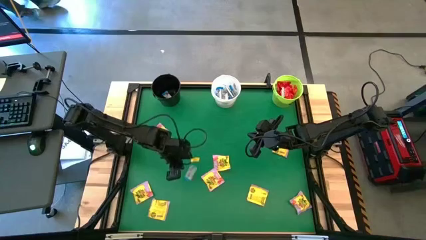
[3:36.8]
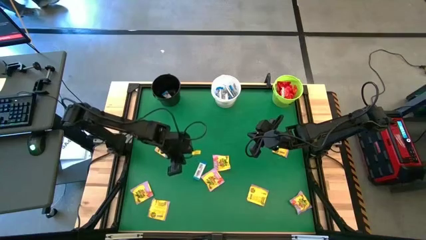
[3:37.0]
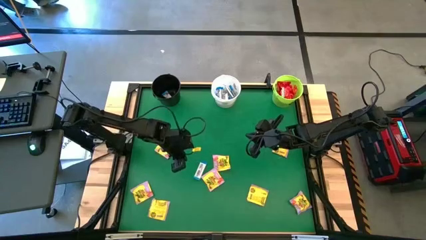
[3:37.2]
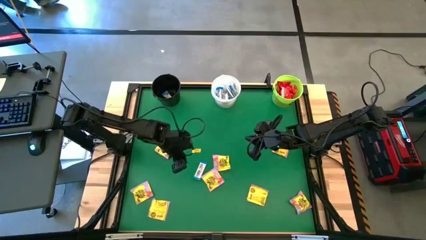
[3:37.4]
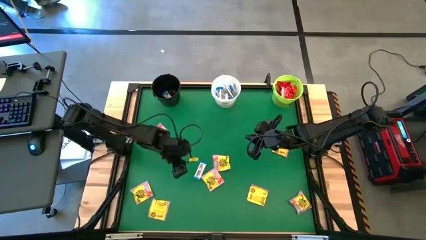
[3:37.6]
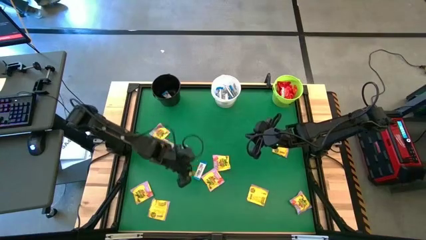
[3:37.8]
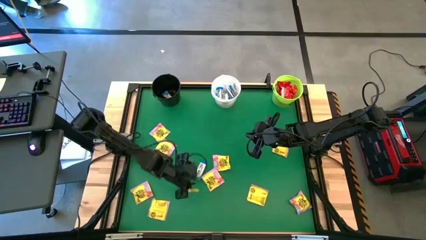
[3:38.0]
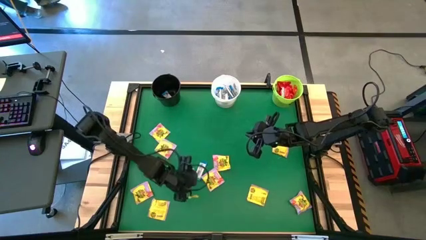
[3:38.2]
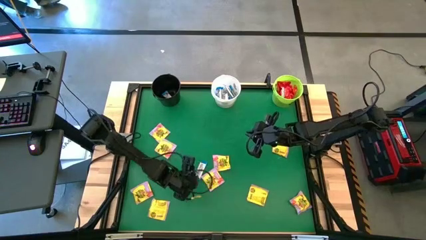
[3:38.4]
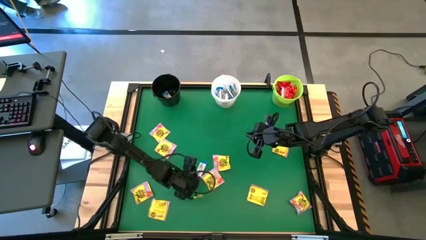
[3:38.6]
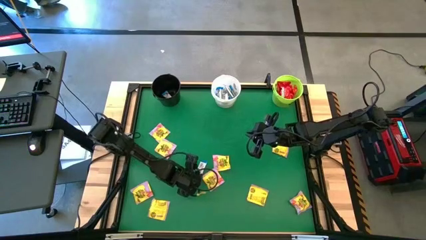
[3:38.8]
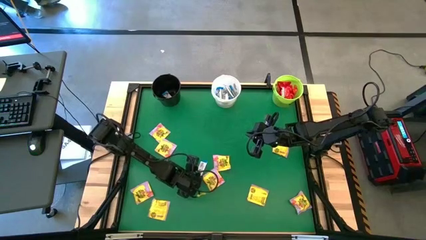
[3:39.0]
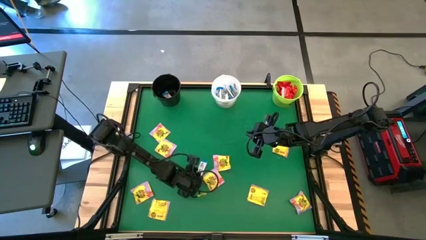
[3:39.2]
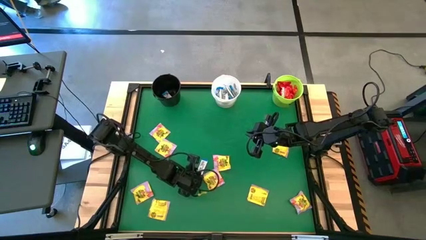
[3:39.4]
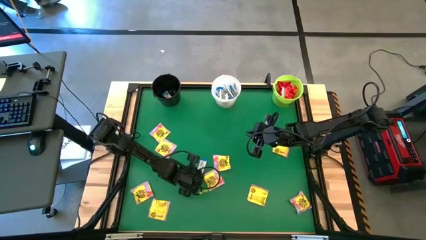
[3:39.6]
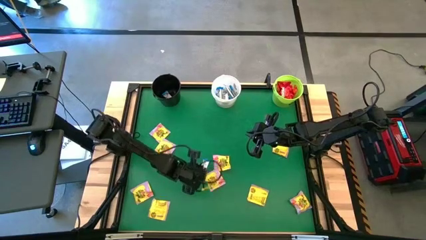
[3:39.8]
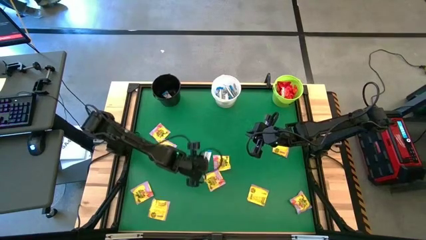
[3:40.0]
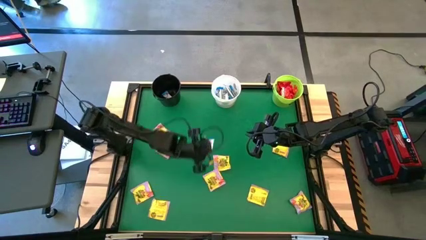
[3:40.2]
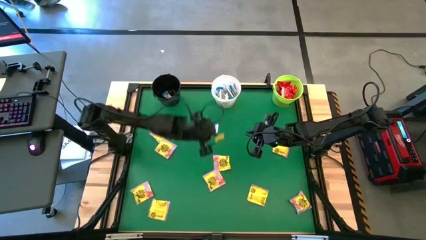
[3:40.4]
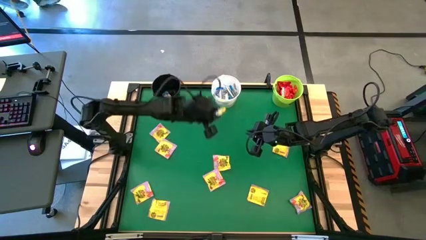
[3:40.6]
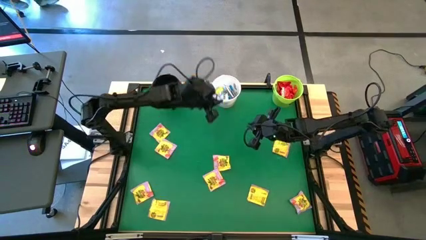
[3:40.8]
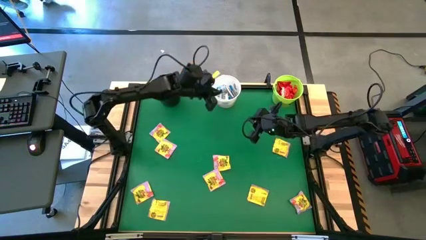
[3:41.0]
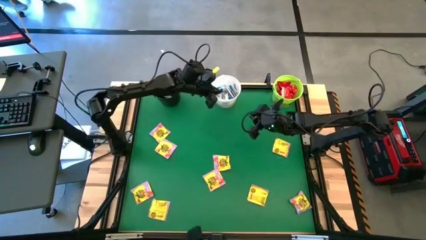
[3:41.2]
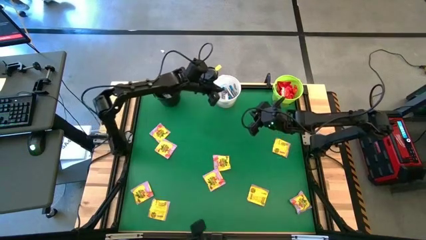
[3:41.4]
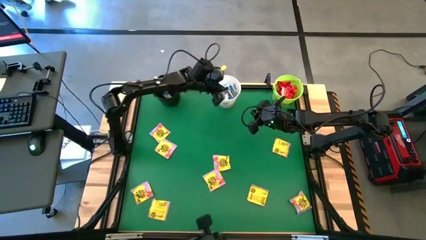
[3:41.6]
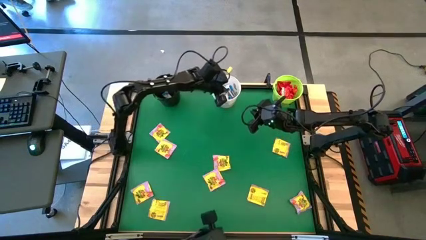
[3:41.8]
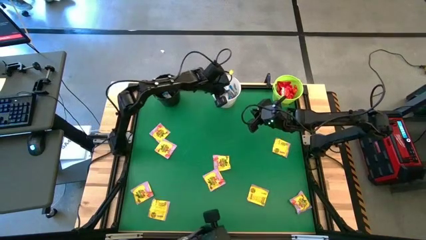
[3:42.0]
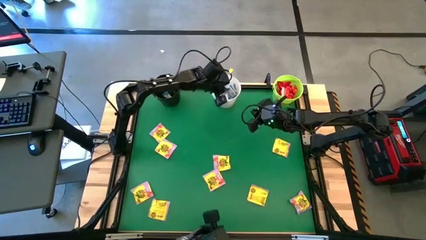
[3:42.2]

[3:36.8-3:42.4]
Task: Sort candy by brand, put in halloween buckets
Put the white candy into the white bucket

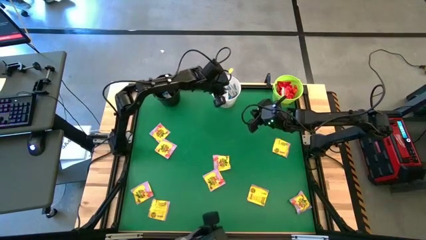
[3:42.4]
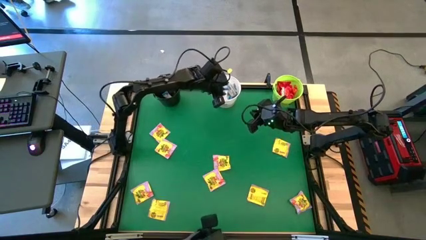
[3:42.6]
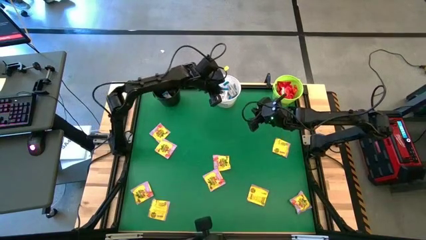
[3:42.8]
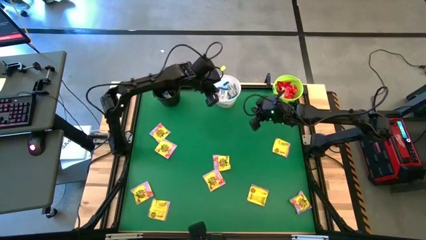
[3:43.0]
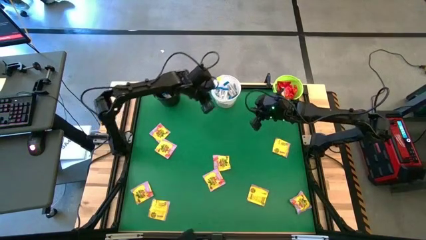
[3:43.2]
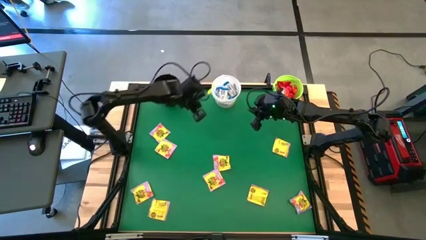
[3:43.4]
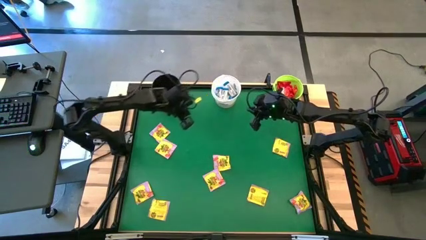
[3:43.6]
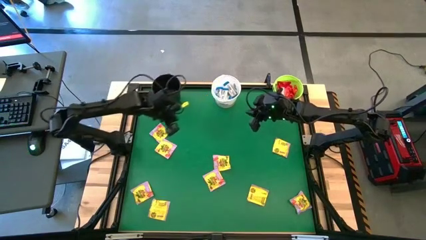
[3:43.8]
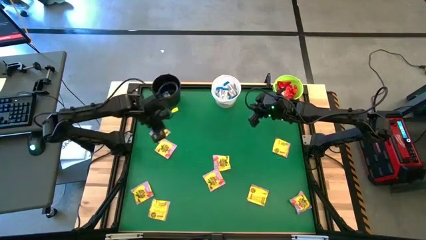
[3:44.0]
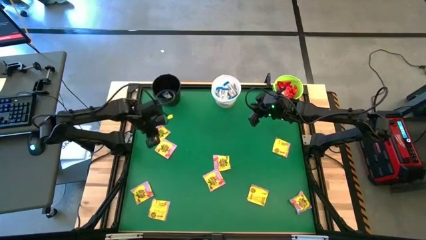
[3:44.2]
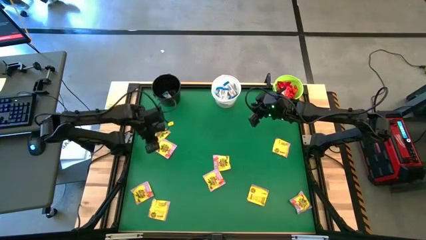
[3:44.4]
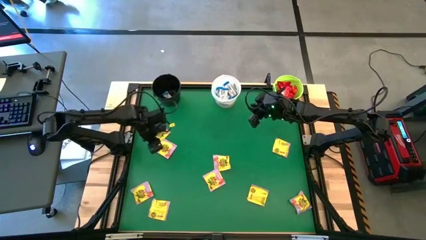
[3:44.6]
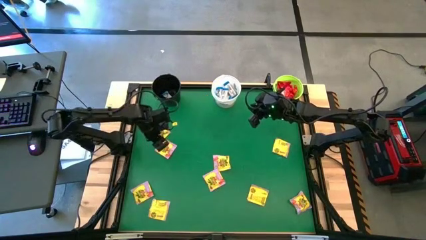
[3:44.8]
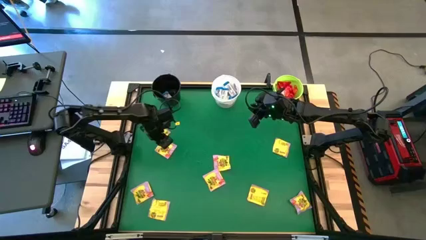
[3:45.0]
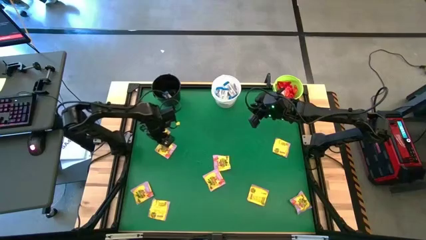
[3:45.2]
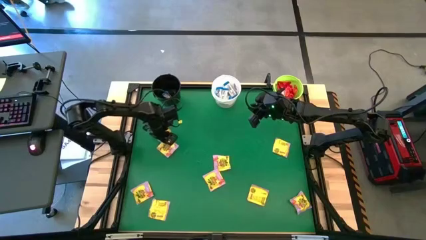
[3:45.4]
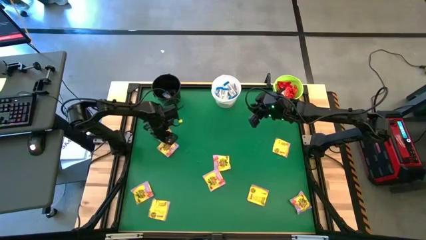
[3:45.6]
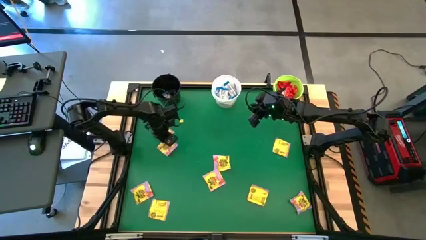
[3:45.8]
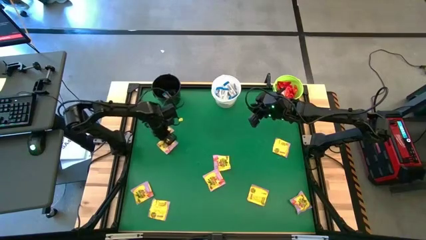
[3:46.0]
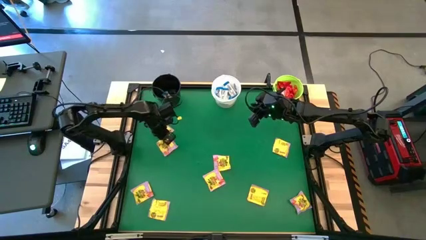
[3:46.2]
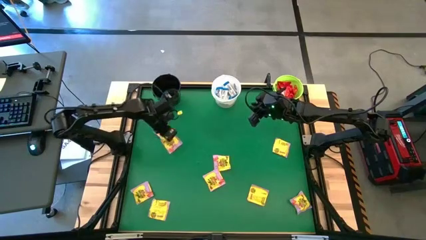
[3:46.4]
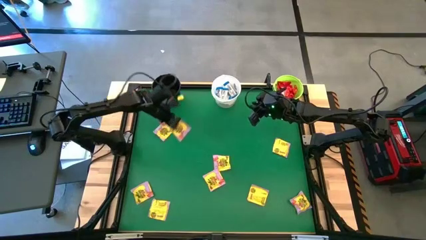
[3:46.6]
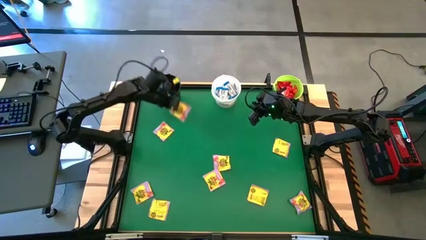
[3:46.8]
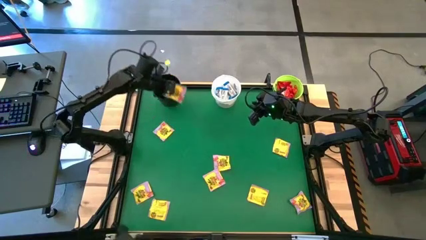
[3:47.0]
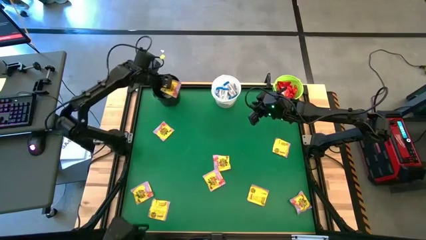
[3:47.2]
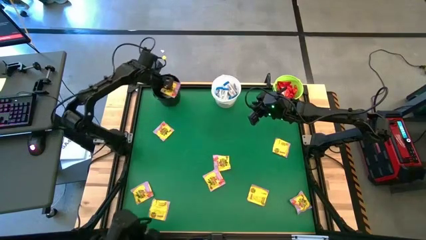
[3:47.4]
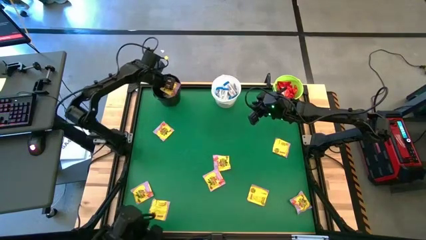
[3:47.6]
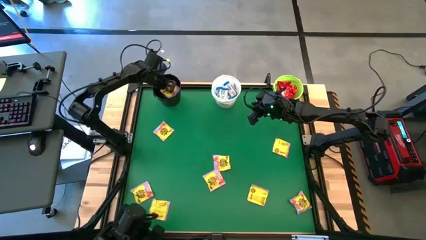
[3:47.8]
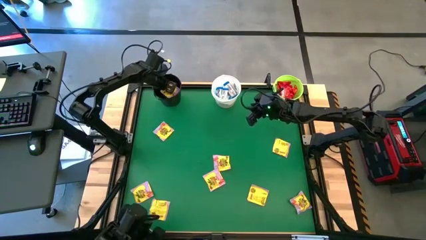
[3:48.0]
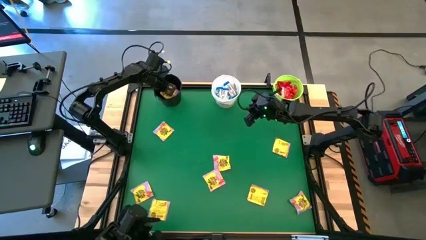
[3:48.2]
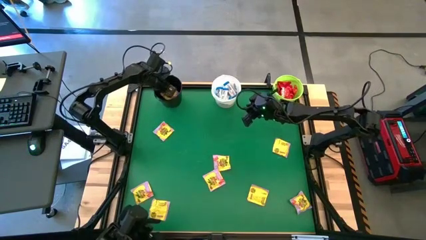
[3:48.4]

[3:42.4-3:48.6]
Put the yellow candy into the black bucket

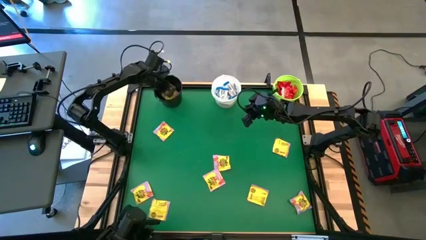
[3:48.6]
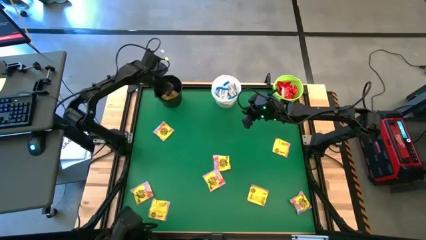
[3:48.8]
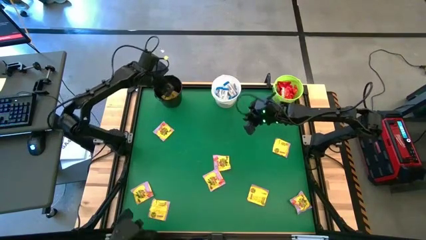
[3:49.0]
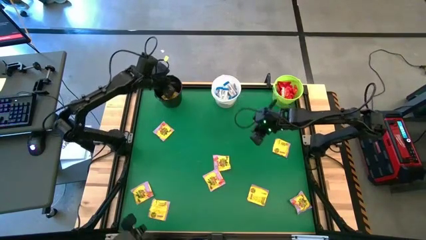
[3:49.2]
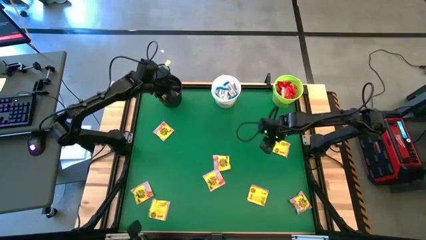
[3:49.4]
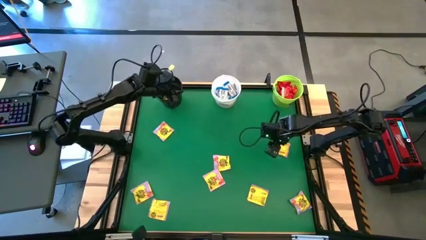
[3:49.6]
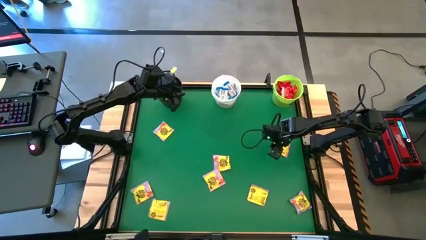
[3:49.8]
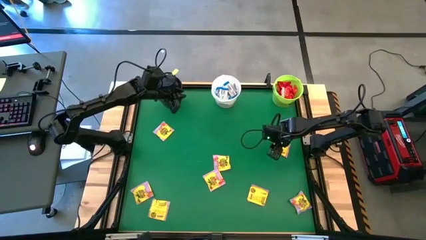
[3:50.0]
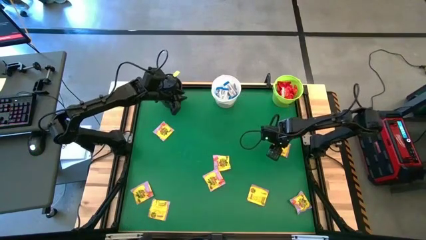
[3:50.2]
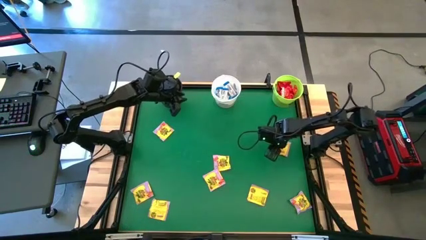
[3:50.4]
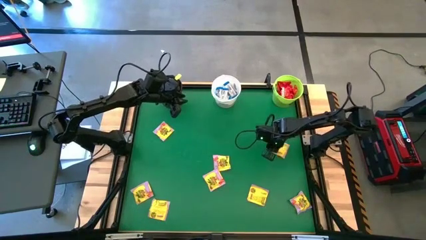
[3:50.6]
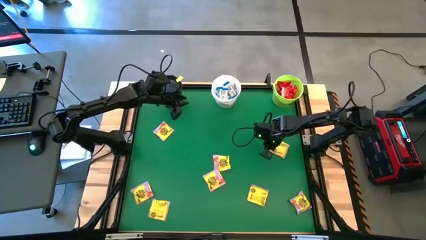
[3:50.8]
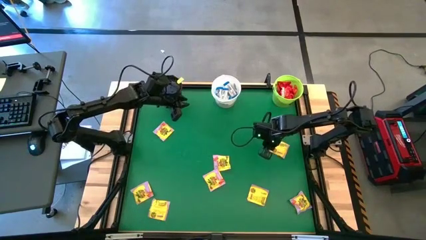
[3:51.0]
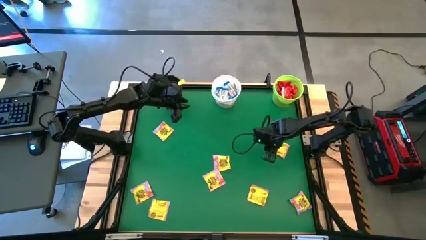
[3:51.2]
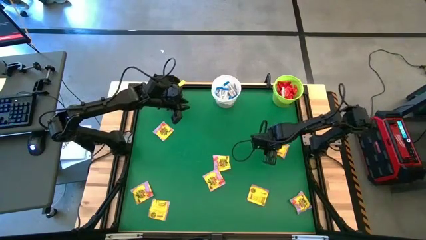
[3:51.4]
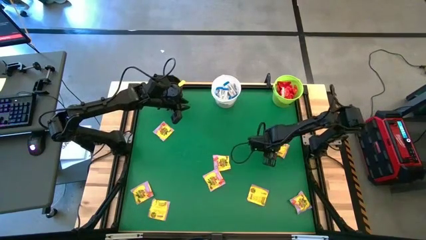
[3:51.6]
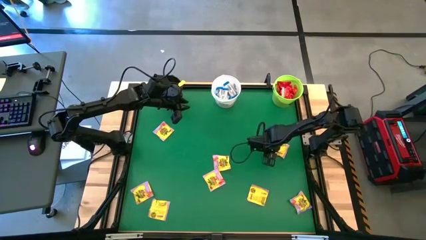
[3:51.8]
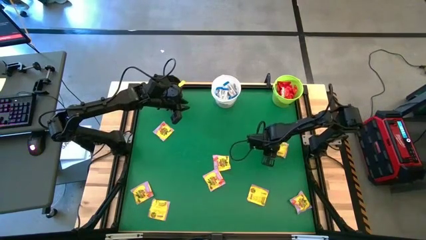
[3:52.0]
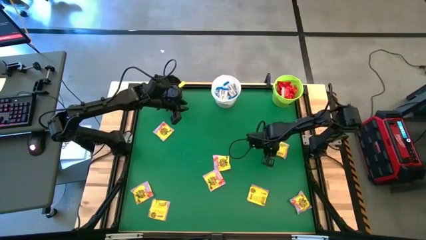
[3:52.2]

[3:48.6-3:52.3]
Put the yellow candy into the black bucket

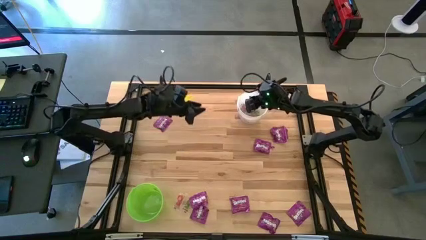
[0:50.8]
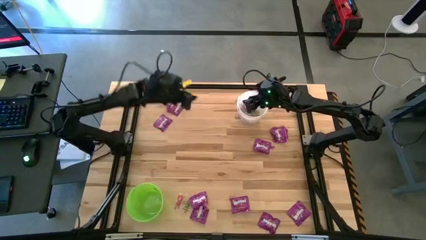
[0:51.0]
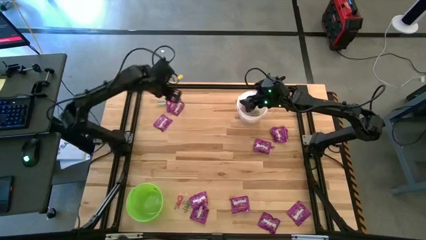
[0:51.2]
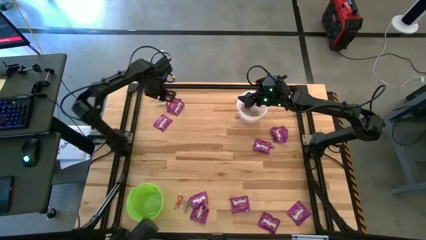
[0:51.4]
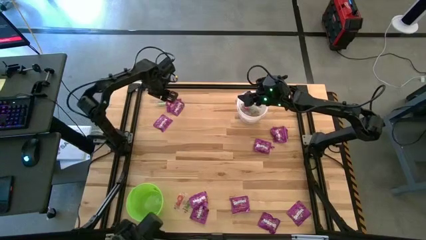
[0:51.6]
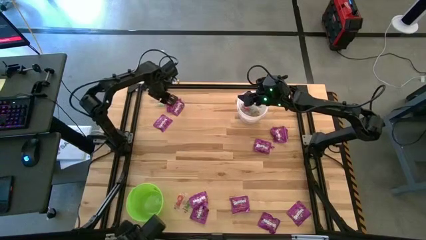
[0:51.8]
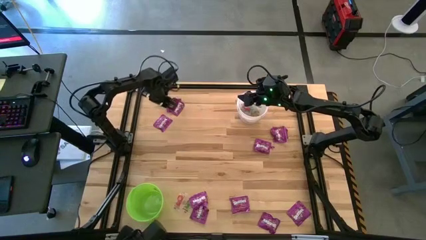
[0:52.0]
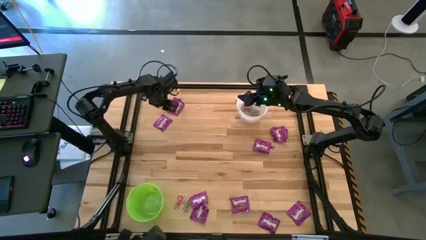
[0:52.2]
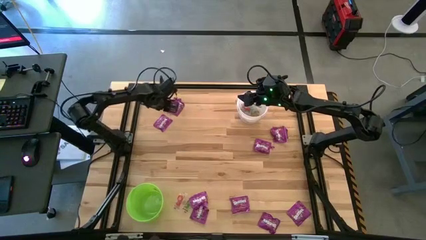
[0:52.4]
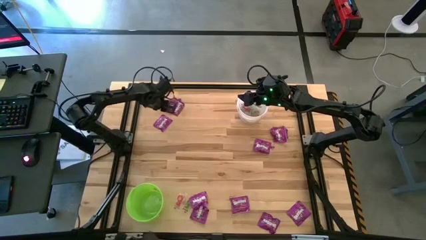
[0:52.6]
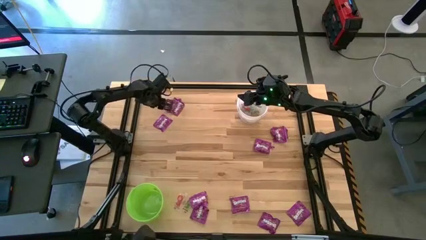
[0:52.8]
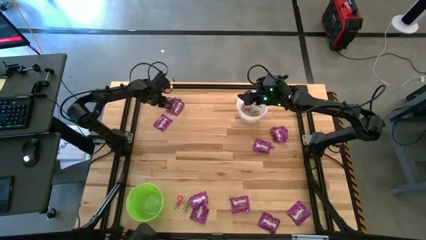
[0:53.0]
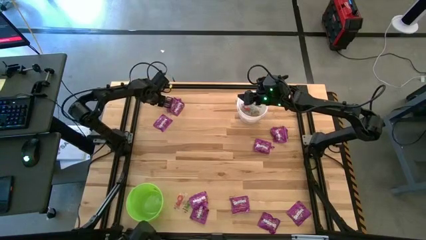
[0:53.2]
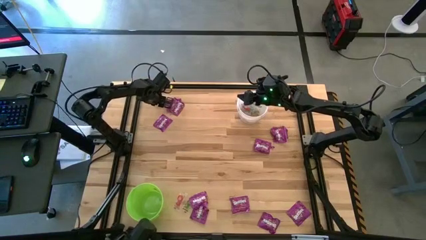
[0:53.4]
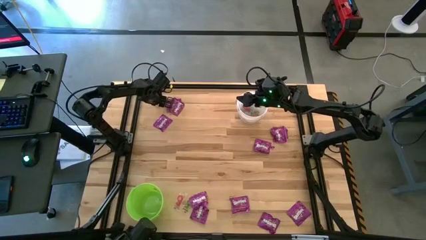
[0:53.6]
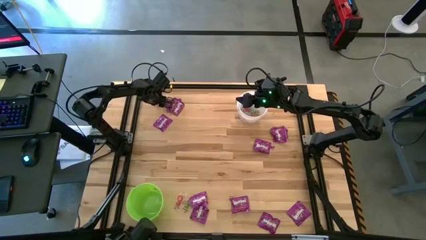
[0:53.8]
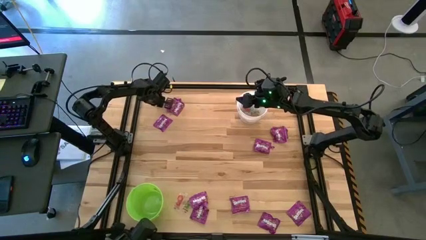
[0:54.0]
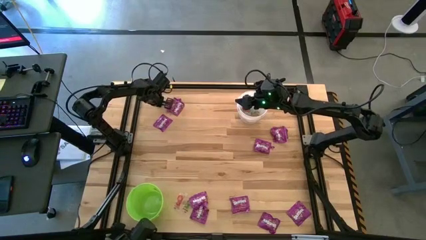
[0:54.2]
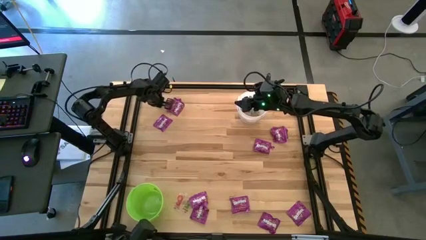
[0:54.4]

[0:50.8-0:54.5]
Task: Sort candy by brand, put in halloween buckets
Put the green gummy into the white bucket
